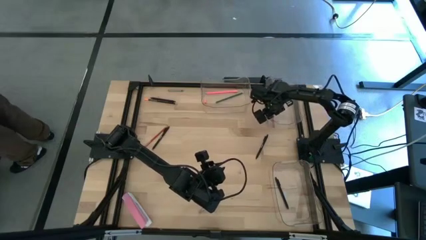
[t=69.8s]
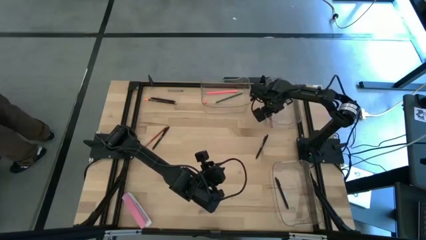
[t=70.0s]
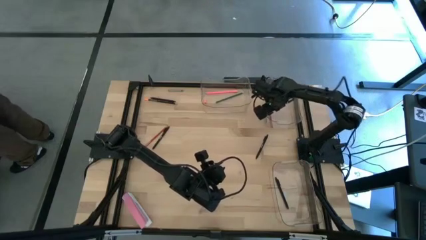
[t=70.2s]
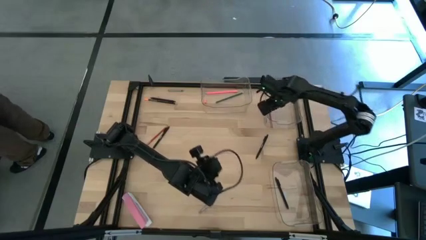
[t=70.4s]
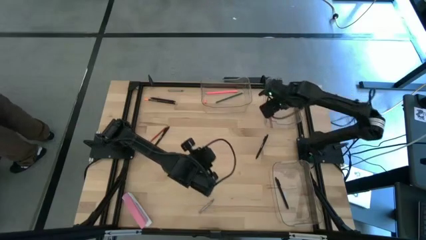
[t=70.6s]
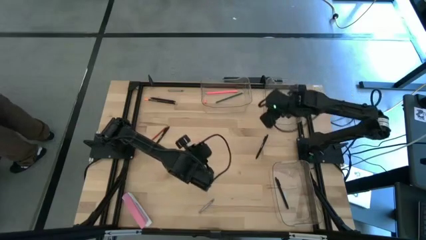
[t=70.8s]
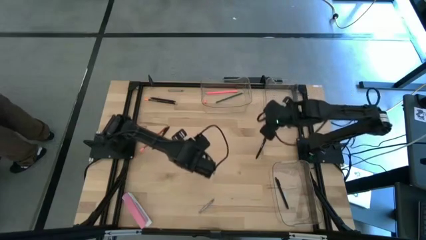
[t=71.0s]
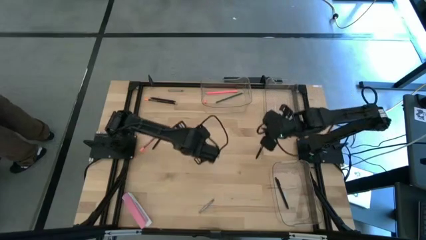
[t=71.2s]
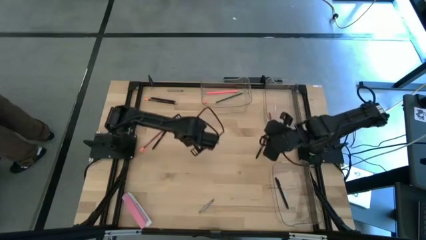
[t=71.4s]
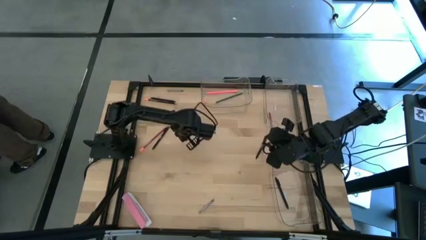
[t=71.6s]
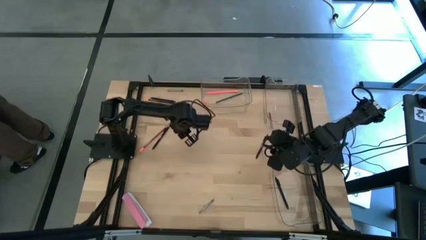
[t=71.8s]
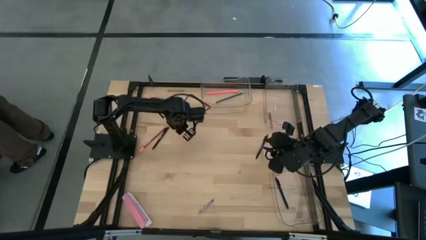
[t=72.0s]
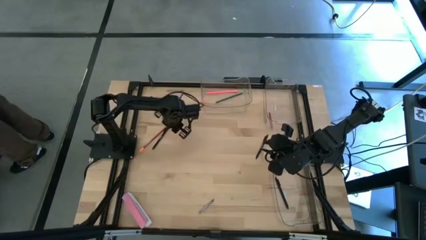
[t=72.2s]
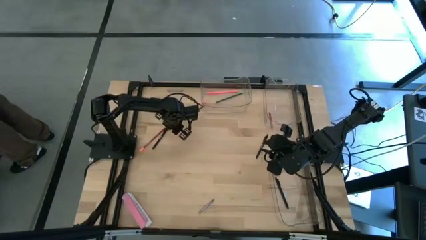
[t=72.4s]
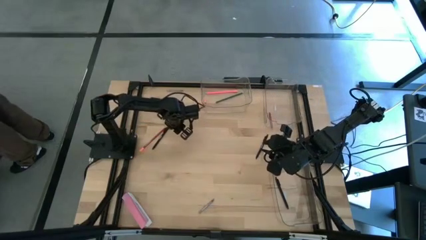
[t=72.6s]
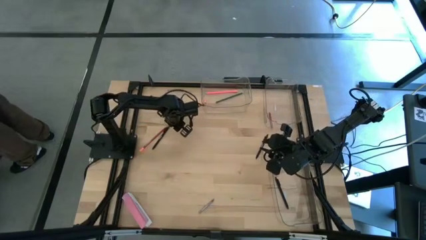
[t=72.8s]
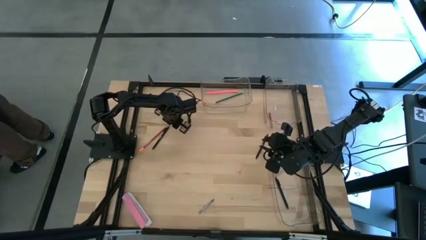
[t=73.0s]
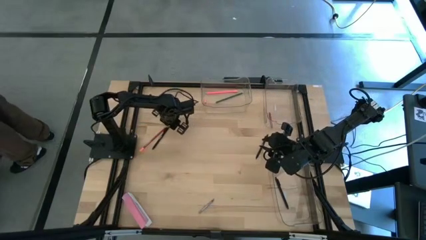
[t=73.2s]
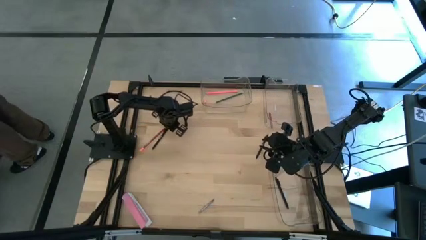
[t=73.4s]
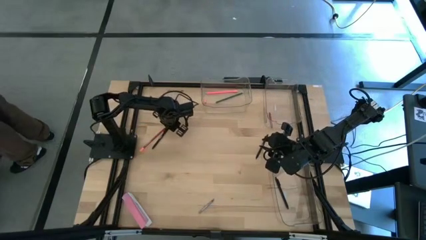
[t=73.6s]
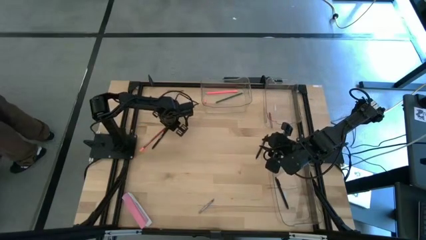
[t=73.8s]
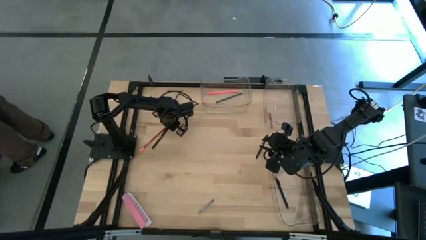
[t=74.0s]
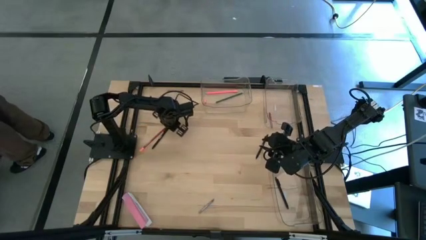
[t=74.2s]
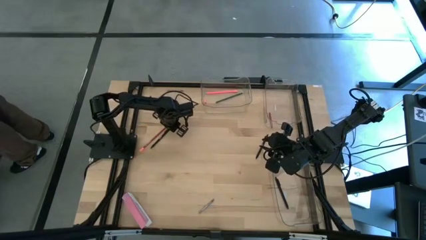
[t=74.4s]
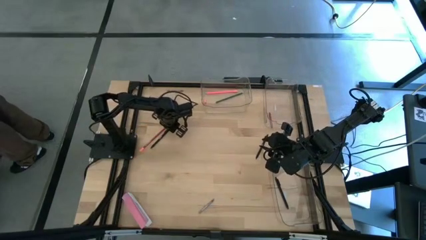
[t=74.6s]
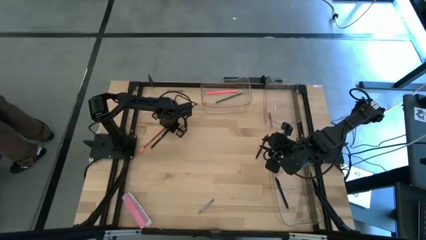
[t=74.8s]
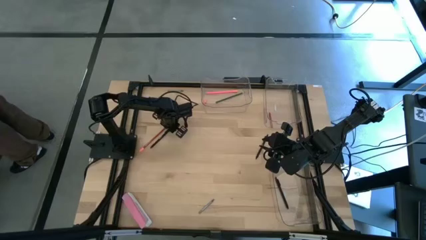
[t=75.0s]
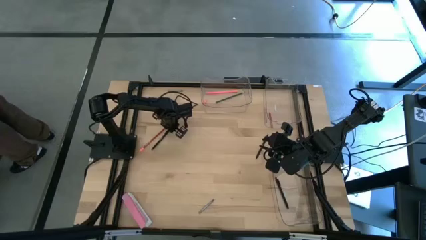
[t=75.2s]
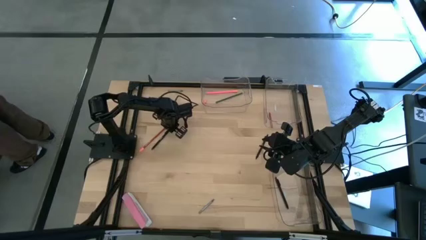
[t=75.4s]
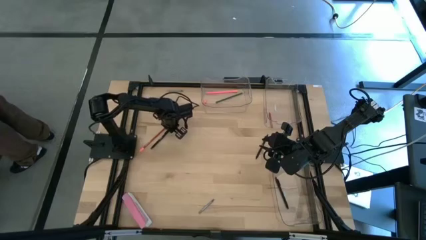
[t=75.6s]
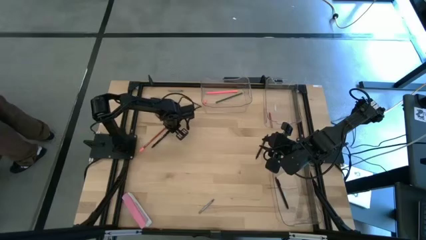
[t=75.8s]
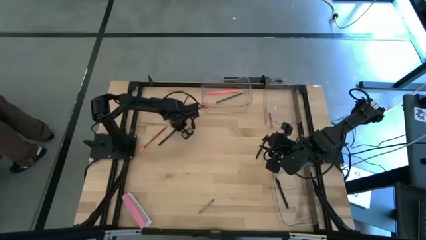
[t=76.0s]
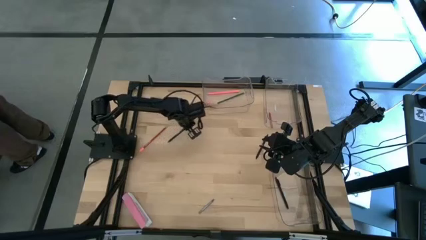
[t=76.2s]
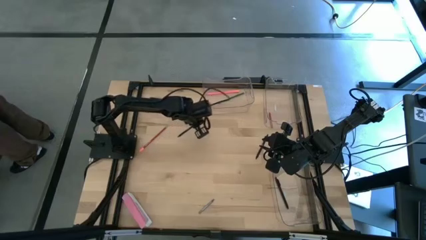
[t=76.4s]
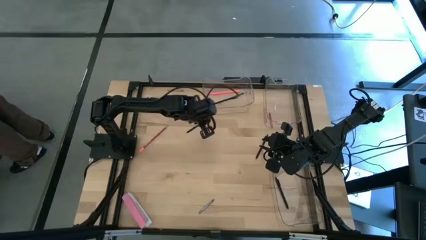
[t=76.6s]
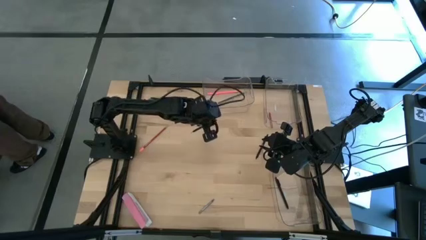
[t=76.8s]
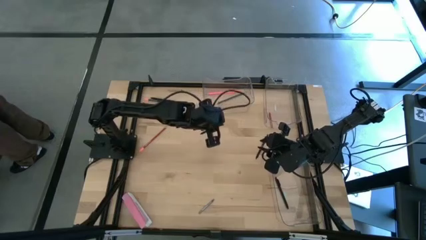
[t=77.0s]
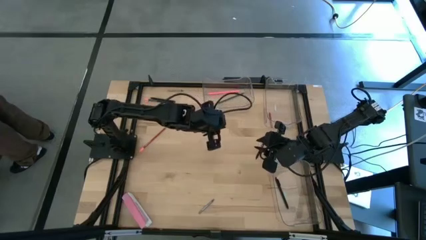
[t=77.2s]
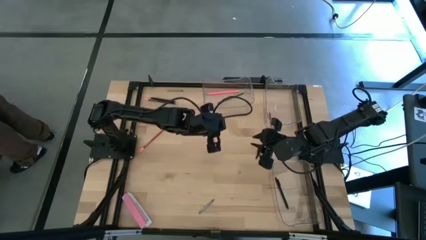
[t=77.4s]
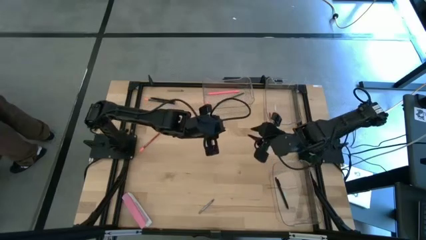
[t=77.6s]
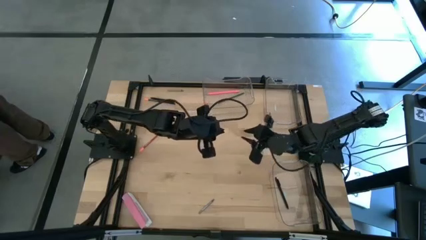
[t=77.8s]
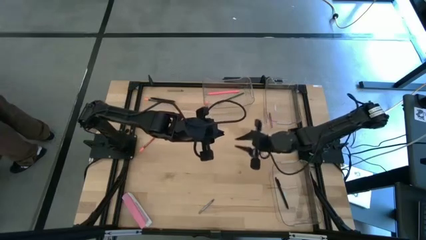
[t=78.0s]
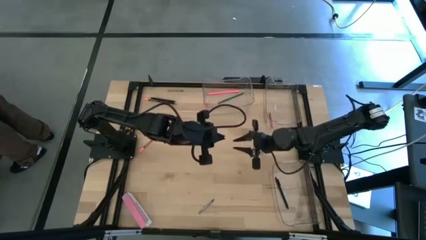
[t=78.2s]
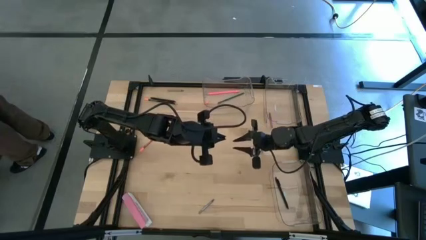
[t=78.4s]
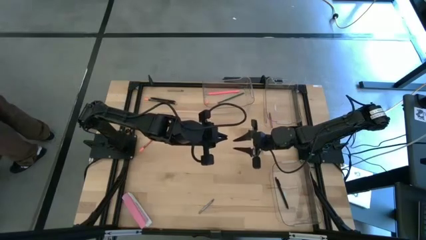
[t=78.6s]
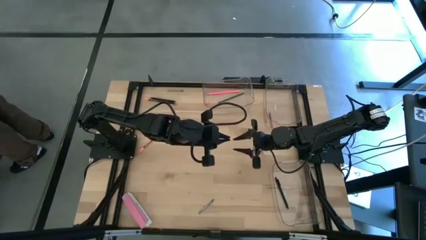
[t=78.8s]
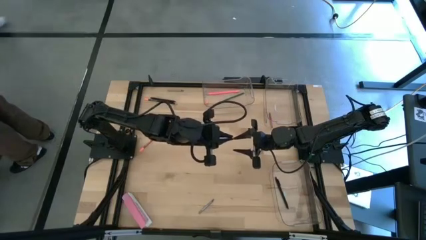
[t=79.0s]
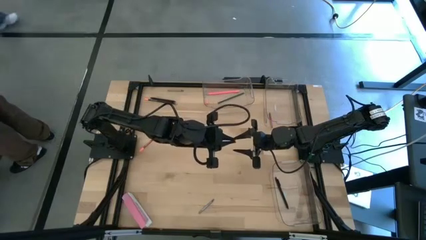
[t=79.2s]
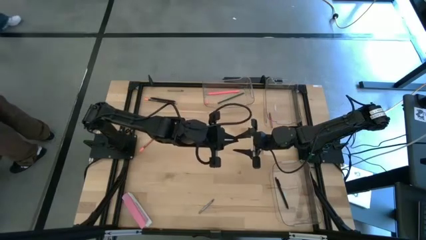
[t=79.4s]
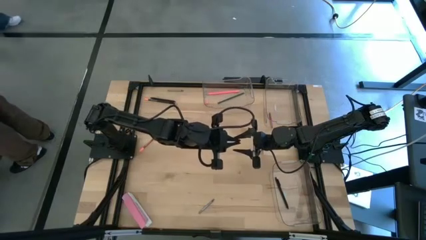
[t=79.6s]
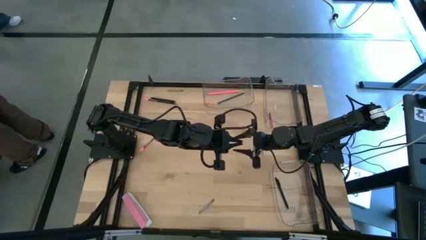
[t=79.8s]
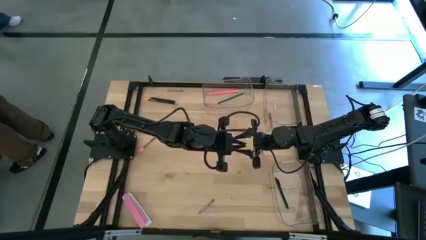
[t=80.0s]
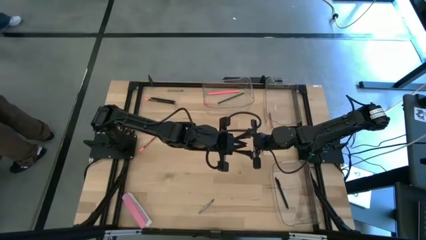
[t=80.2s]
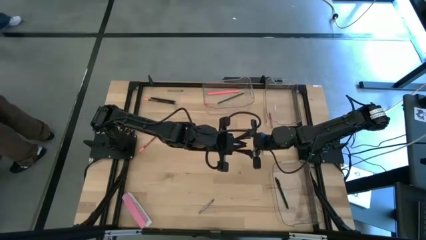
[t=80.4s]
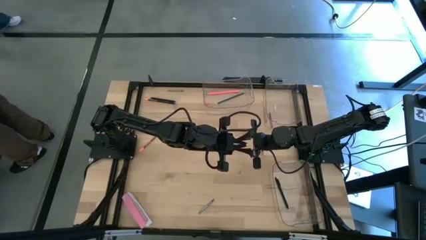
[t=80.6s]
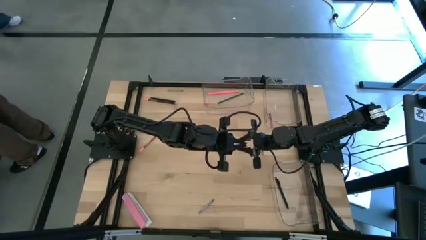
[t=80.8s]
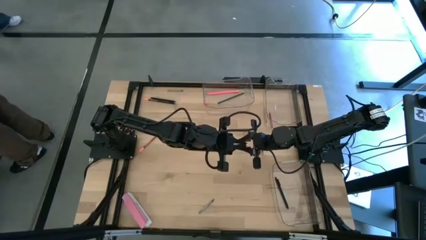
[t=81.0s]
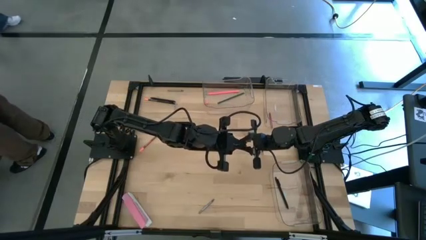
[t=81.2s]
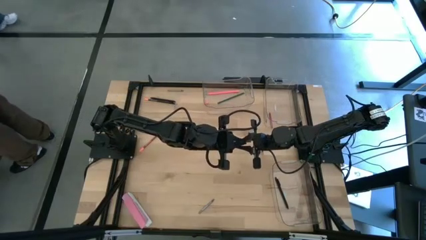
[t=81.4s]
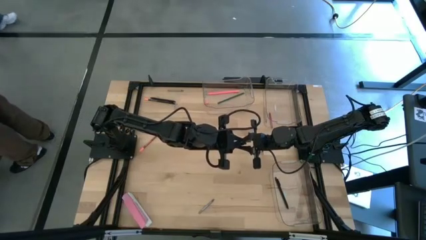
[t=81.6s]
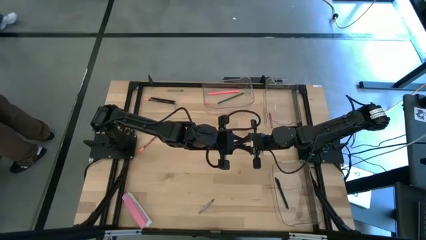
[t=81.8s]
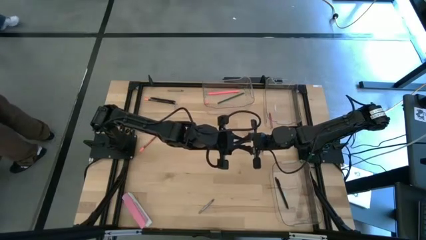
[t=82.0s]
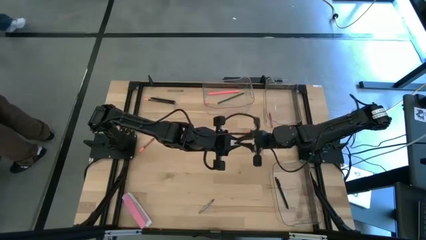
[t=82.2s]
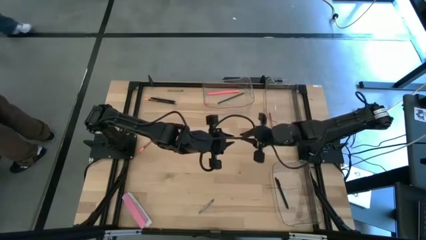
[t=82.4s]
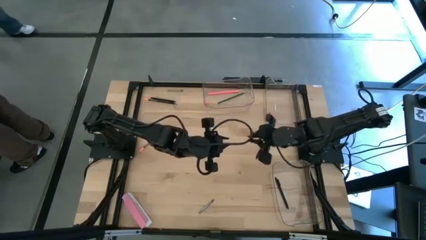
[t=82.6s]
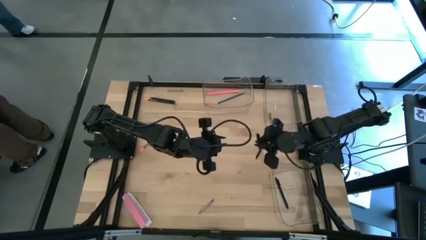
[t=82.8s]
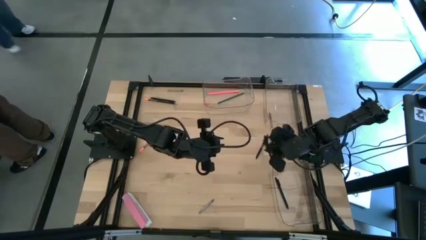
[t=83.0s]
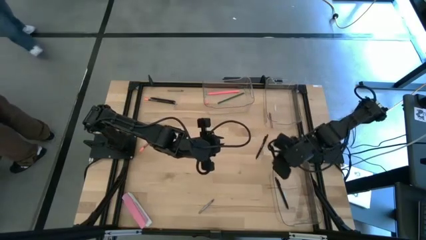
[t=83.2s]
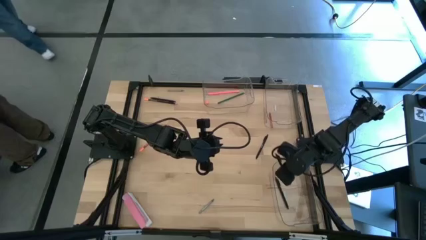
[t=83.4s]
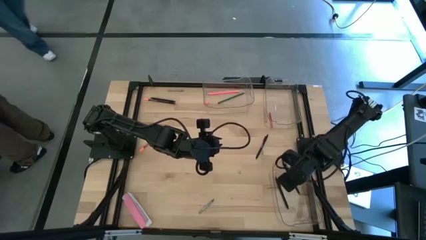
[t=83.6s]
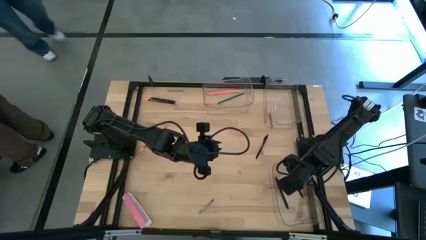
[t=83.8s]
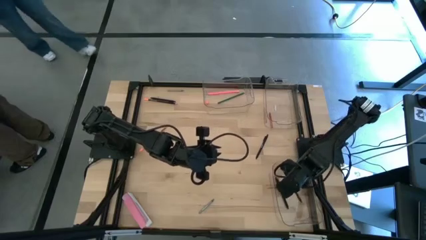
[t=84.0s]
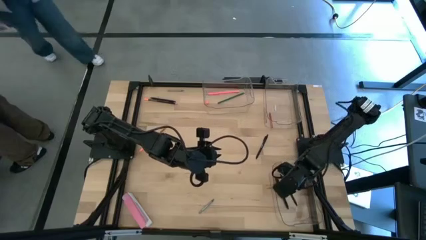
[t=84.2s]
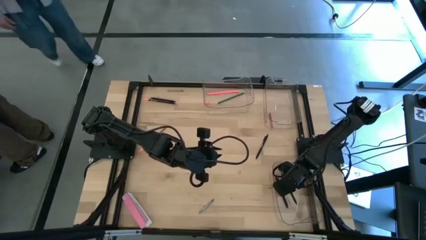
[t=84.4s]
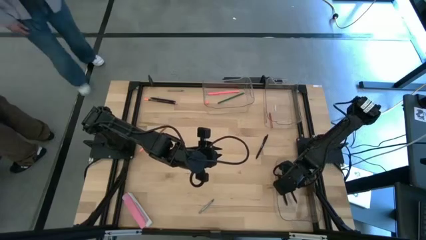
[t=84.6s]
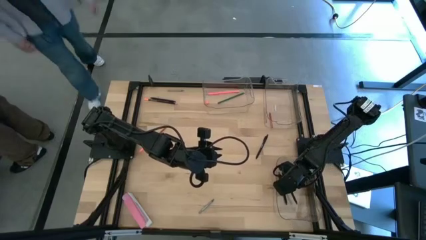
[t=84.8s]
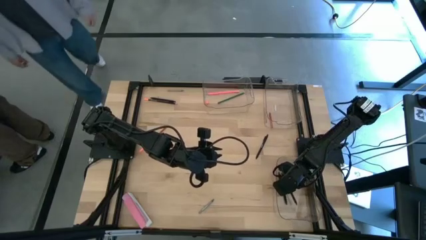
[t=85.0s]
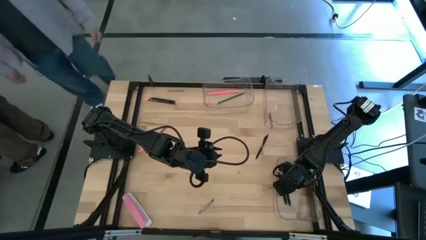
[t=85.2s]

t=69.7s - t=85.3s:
Task: Sort crayons/erasers/pens/pencils in bins
Put the bottom left black pen into the bottom right transparent bin
